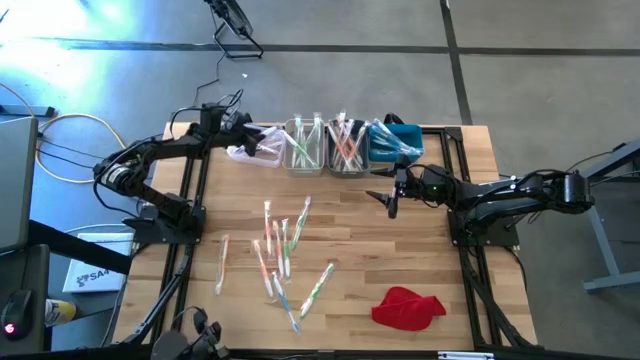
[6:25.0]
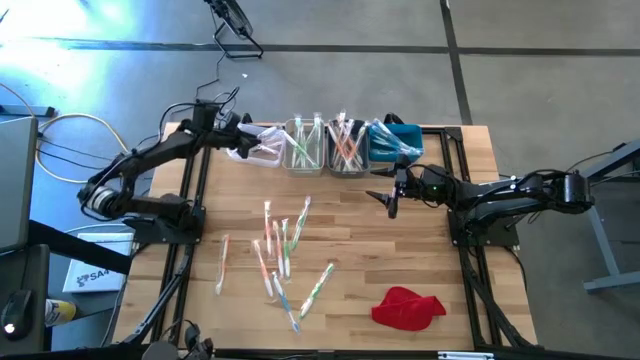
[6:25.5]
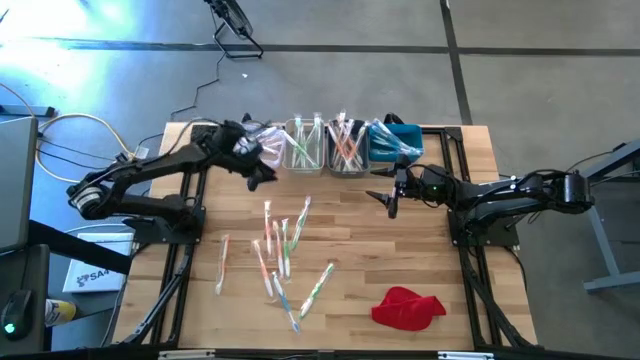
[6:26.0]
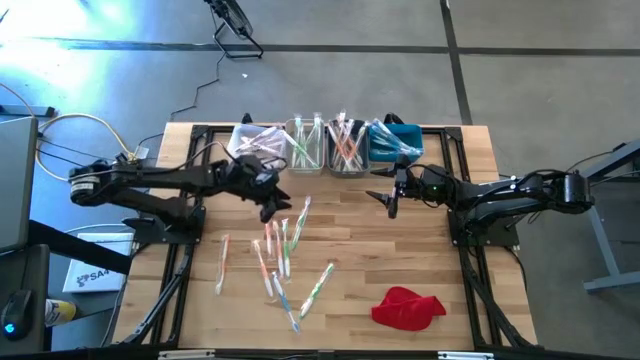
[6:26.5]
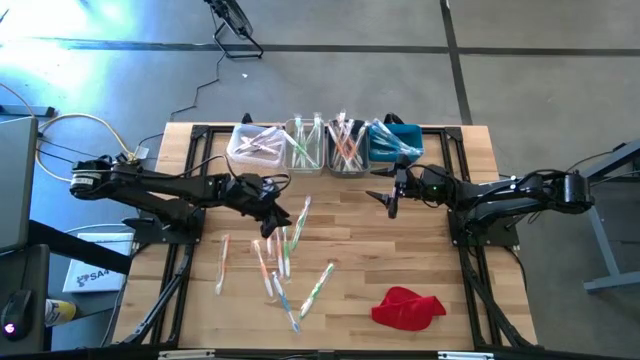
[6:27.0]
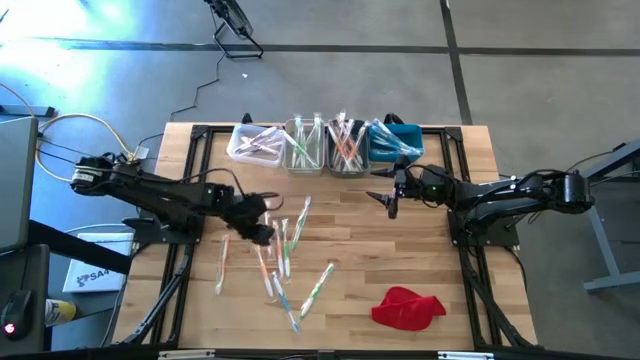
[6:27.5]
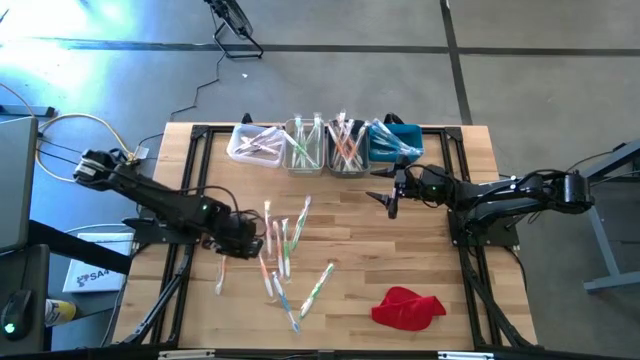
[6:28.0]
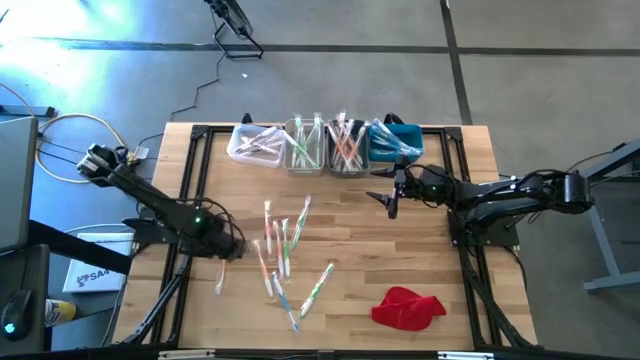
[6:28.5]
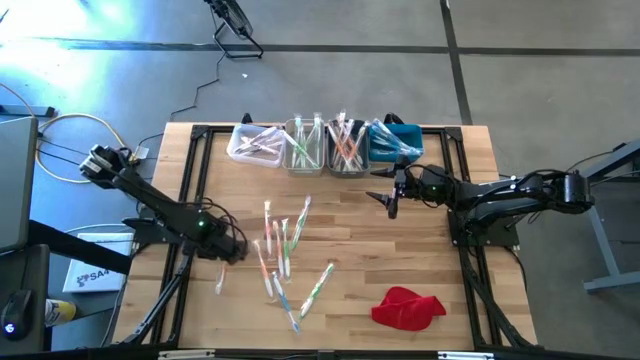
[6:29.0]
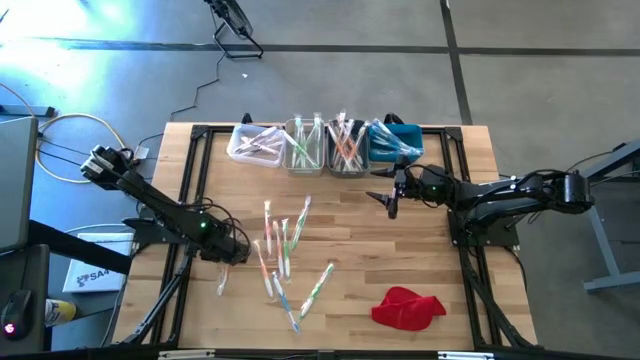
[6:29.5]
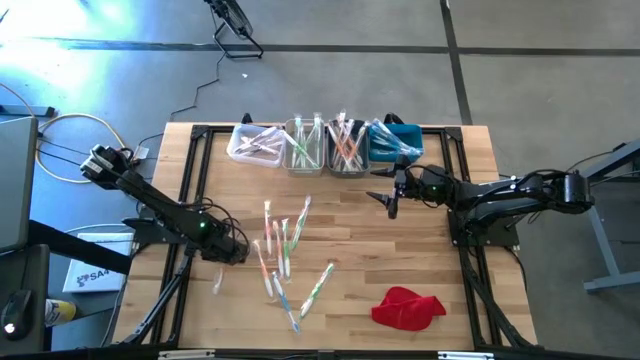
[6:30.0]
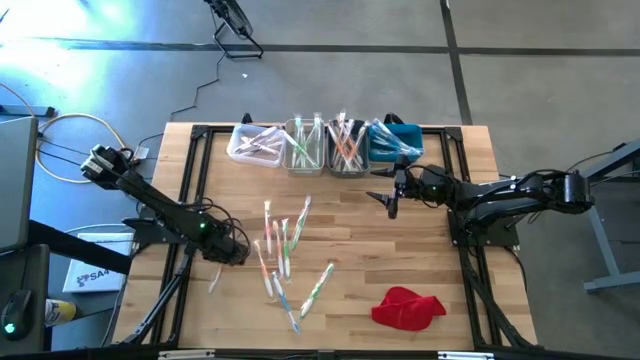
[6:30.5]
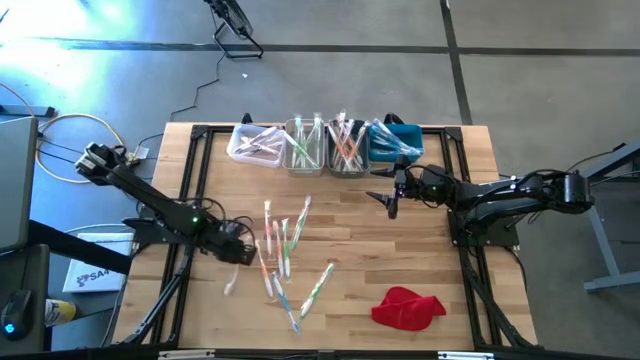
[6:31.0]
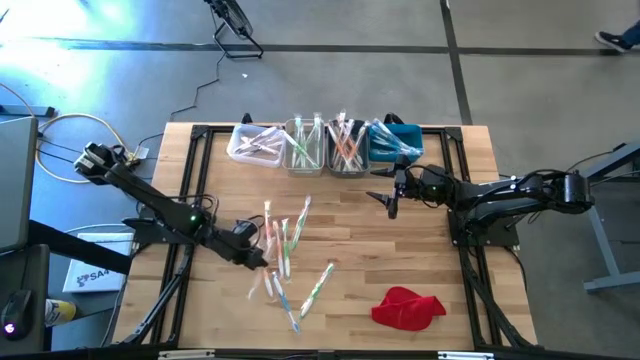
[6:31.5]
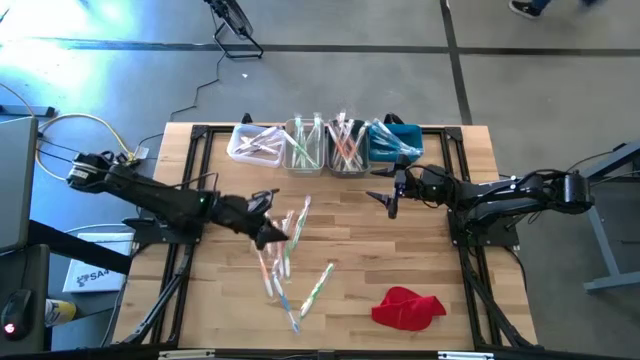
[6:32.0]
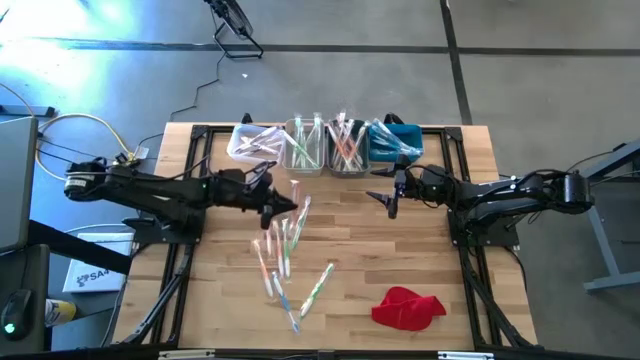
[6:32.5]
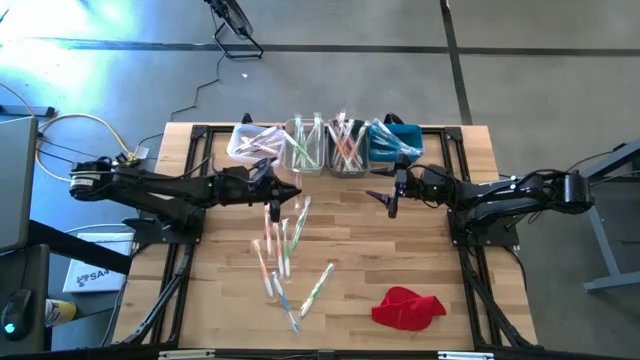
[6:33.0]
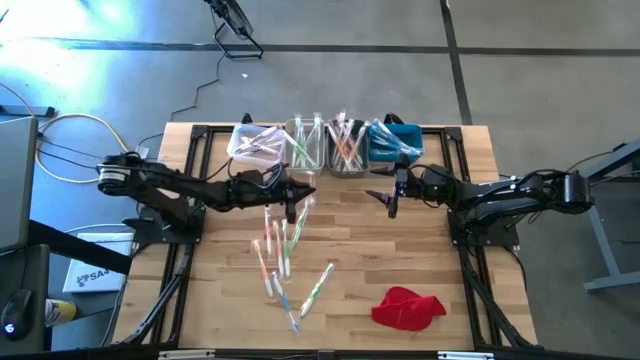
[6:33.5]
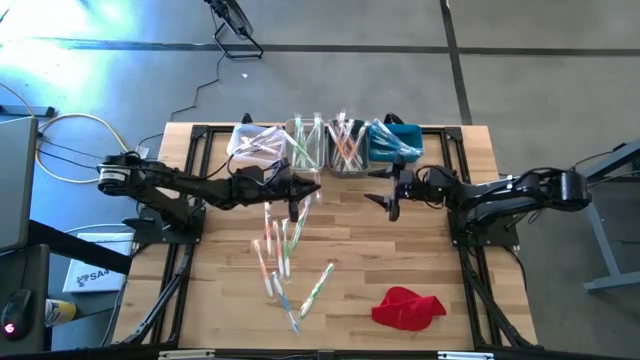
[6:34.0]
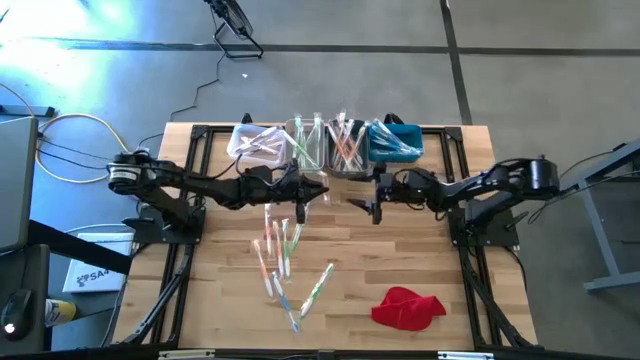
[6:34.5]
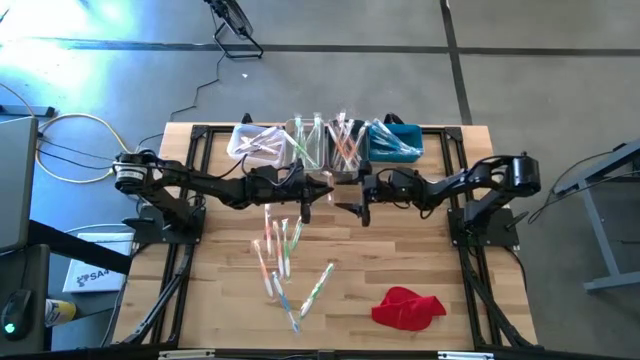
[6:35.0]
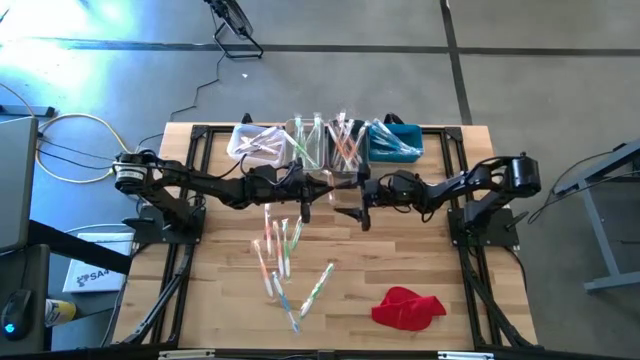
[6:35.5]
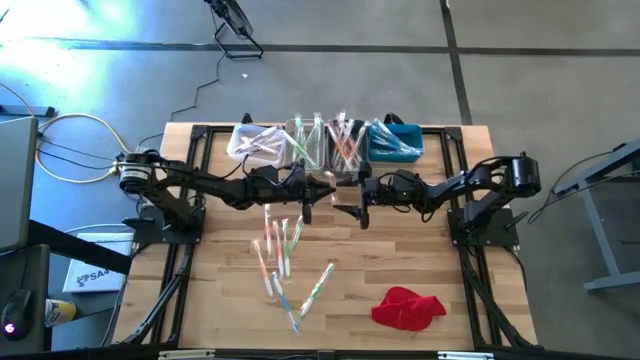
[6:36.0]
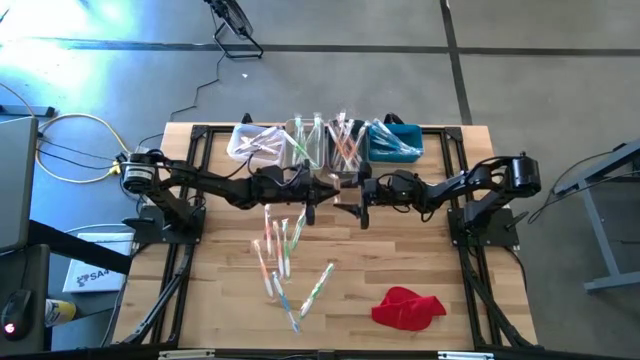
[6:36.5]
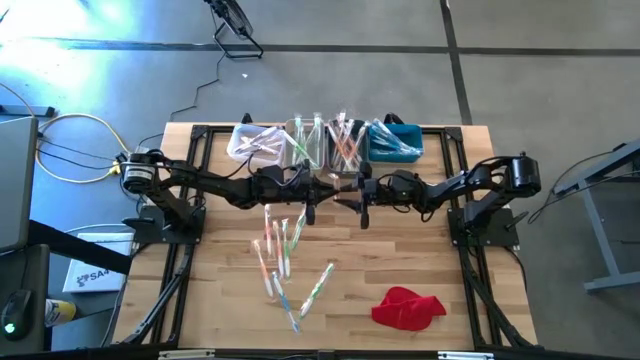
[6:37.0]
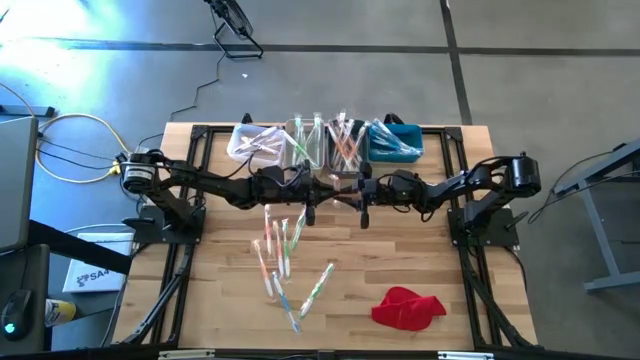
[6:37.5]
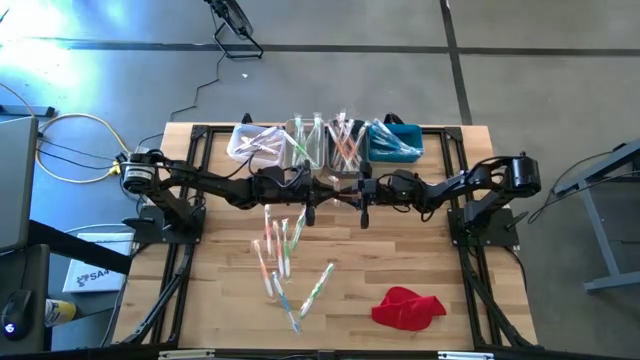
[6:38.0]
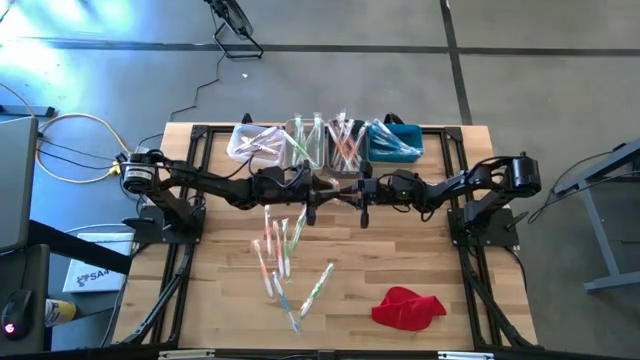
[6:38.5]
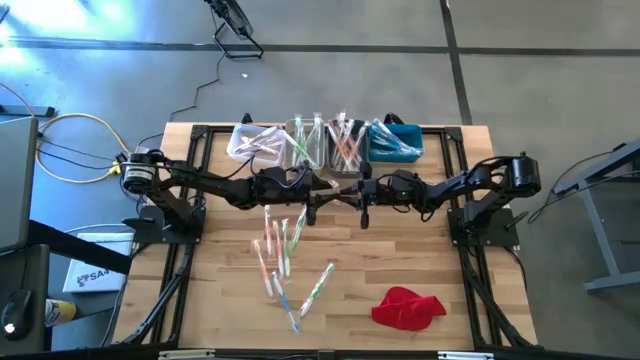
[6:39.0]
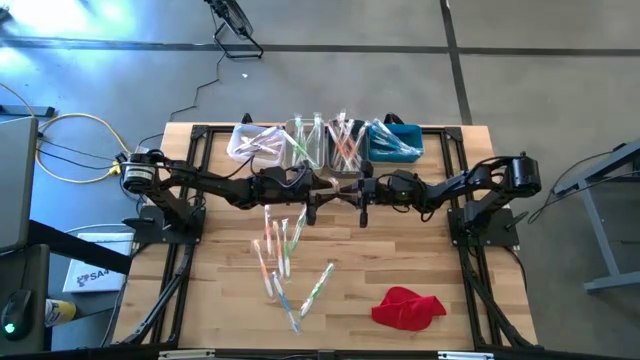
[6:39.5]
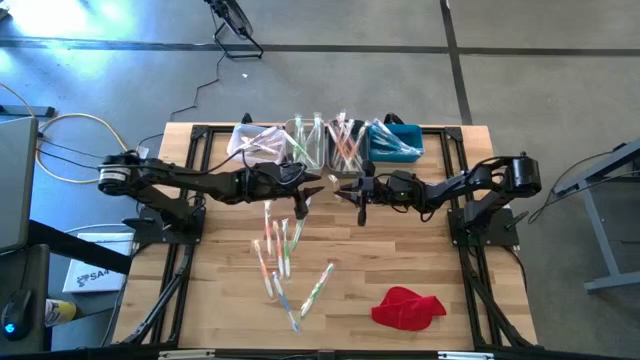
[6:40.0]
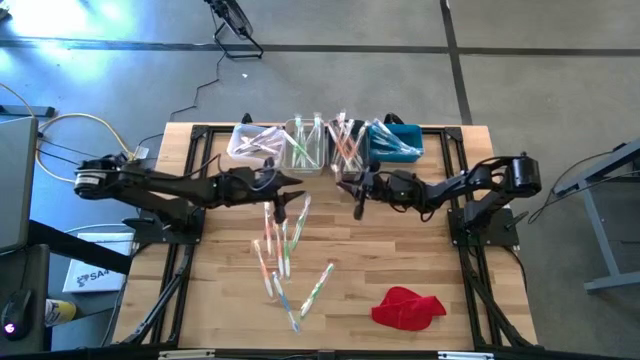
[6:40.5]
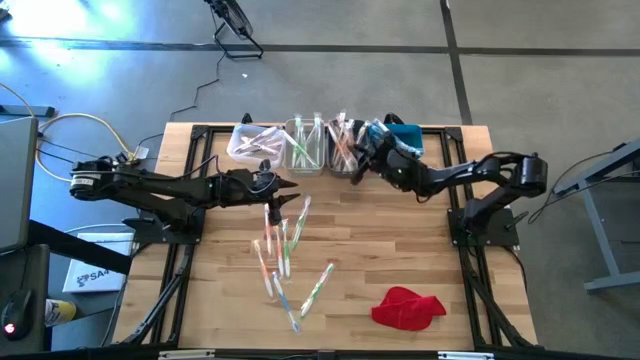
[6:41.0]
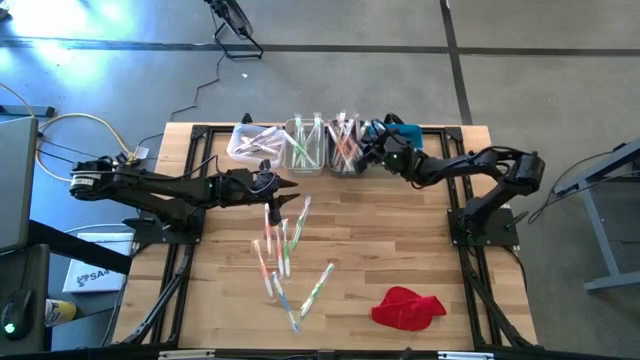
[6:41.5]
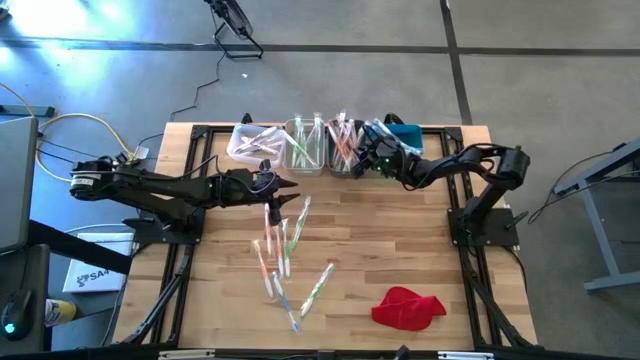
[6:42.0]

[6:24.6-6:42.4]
Task: Pick & Place Toothbrushes
Put the orange toothbrush into the dark green bin

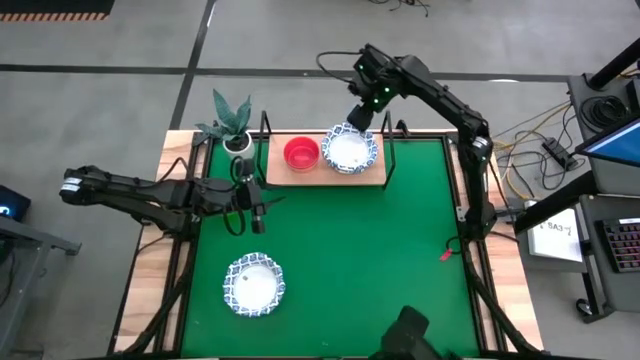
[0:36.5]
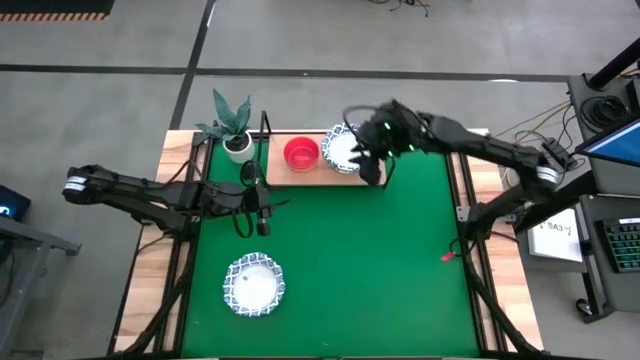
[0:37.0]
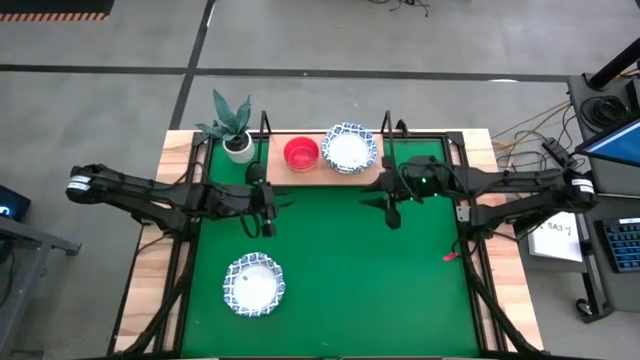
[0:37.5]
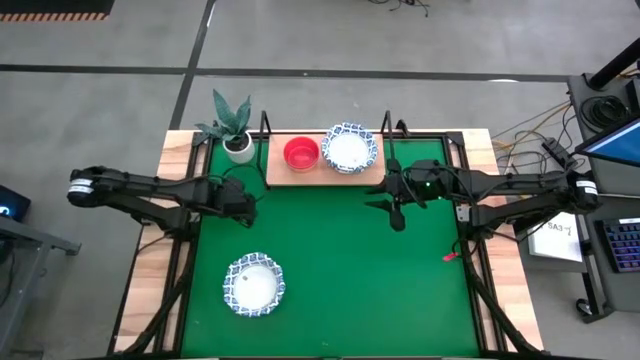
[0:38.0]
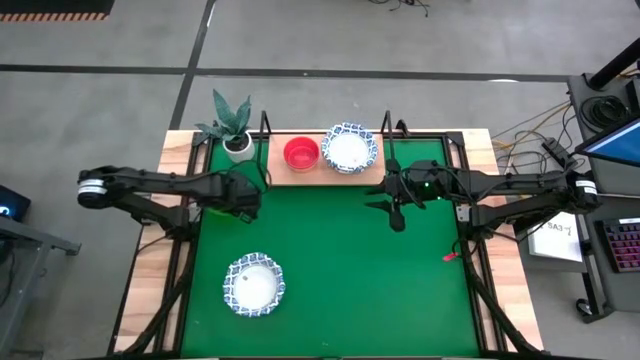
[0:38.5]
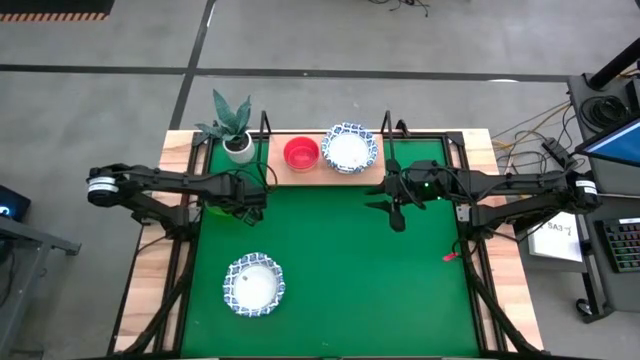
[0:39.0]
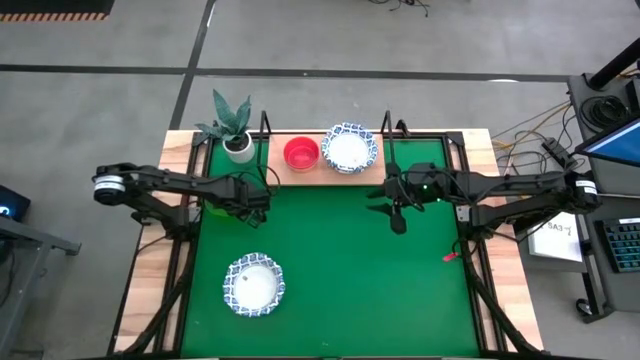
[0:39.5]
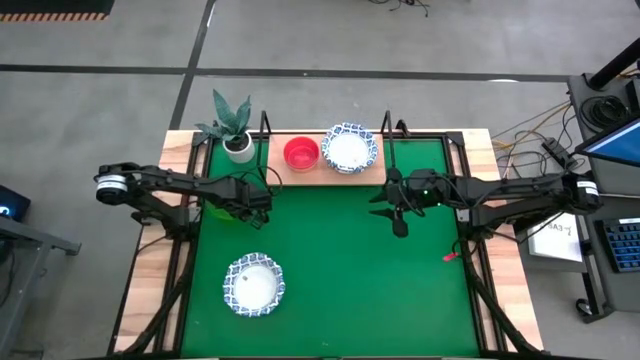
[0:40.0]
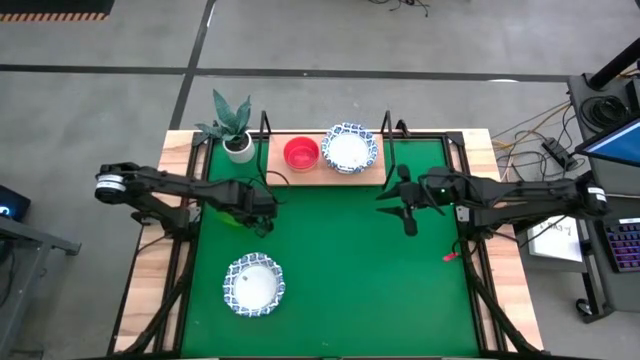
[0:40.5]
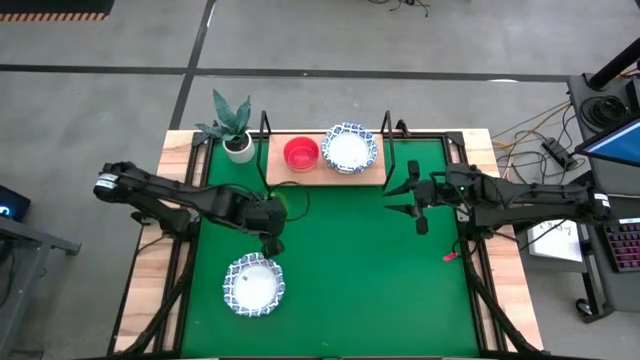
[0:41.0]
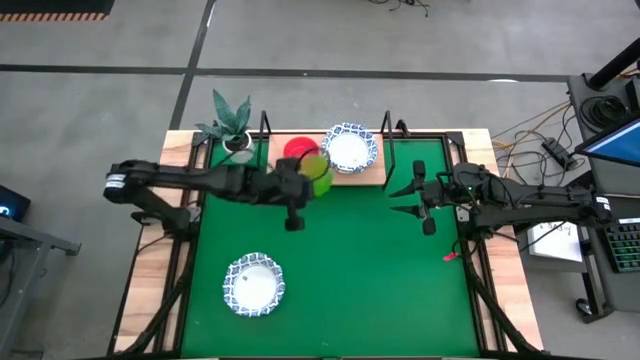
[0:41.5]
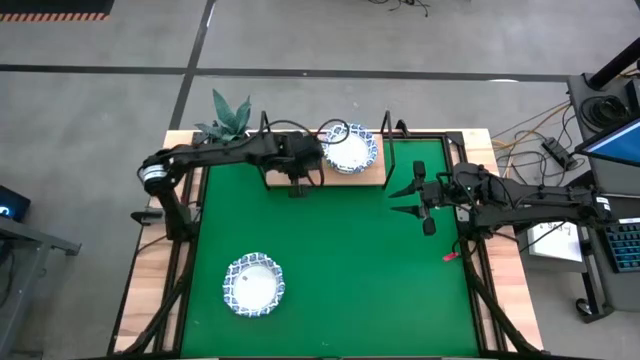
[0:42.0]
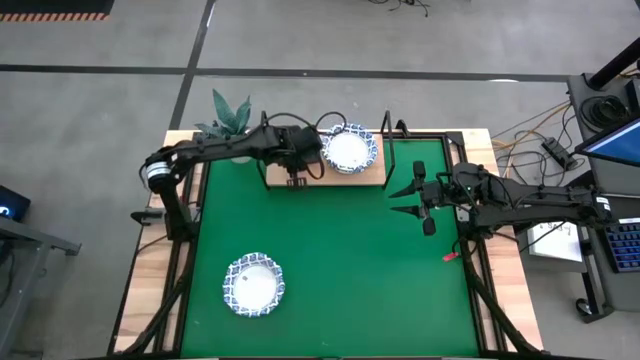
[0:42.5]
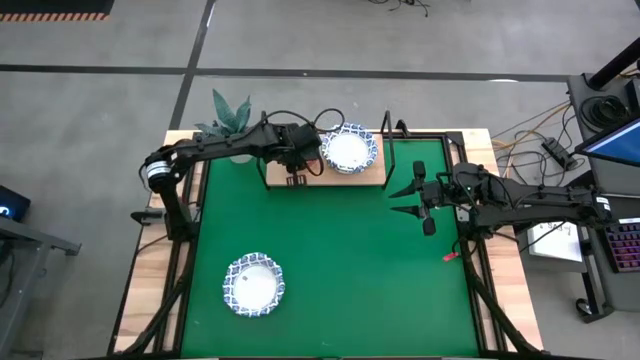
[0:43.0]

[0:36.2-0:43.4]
Task: Place and stack bowls onto a shelf
Stack the transparent green bowl on top of the transparent orange bowl on the shelf
